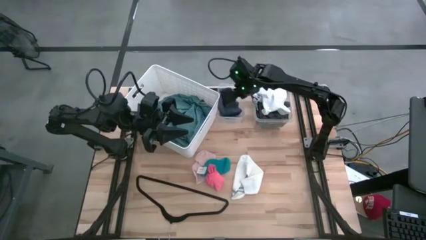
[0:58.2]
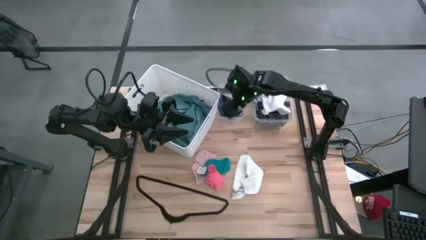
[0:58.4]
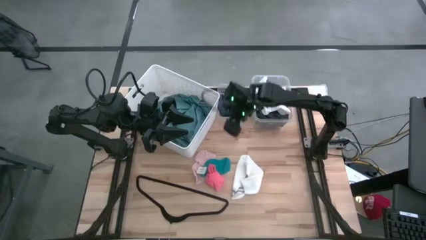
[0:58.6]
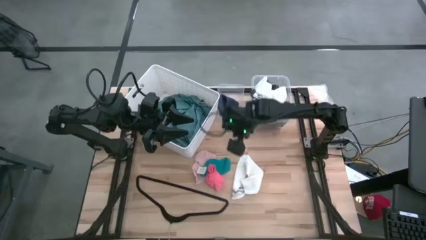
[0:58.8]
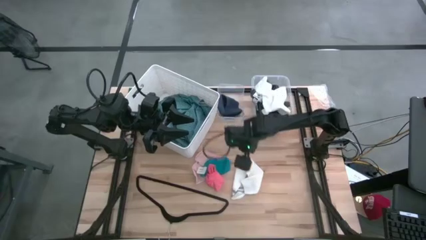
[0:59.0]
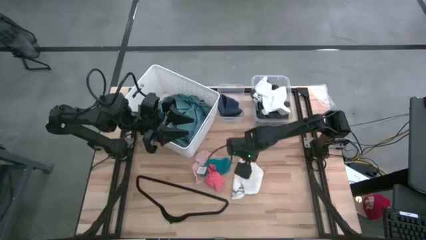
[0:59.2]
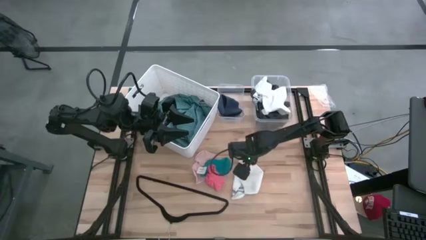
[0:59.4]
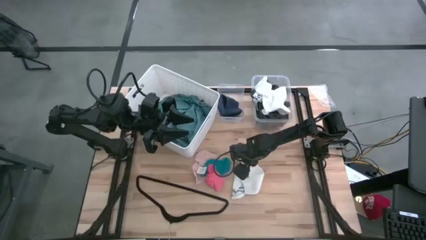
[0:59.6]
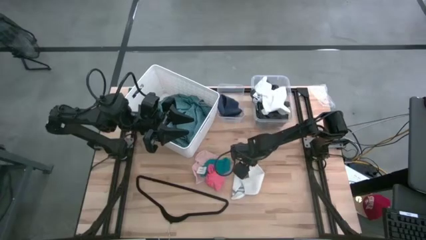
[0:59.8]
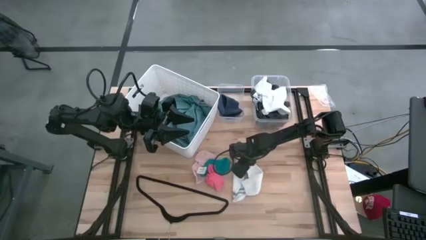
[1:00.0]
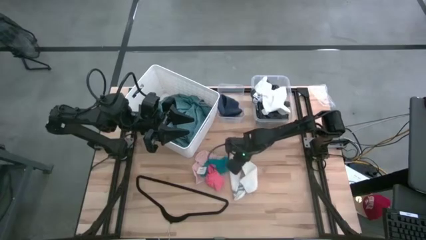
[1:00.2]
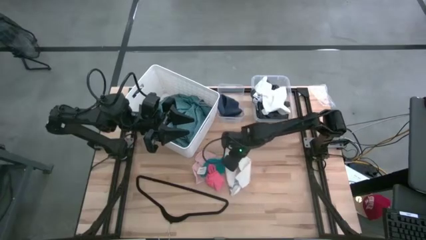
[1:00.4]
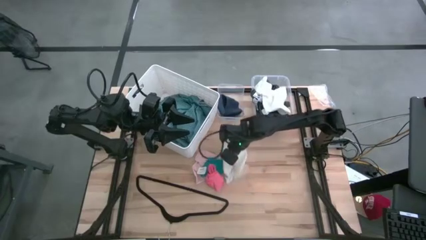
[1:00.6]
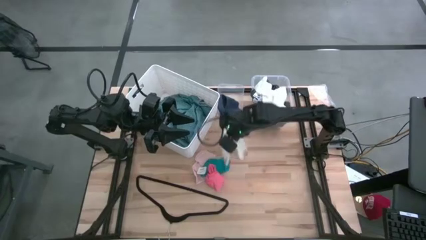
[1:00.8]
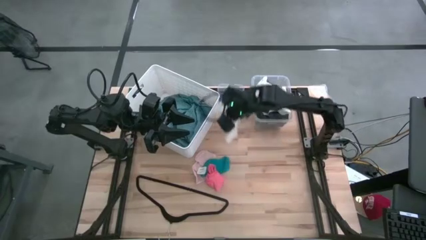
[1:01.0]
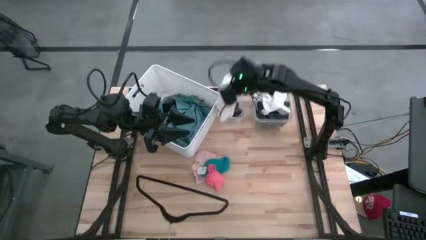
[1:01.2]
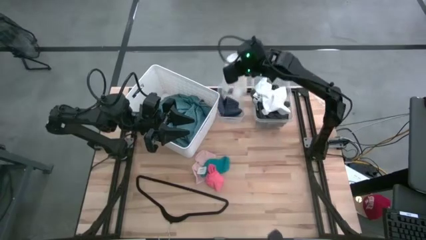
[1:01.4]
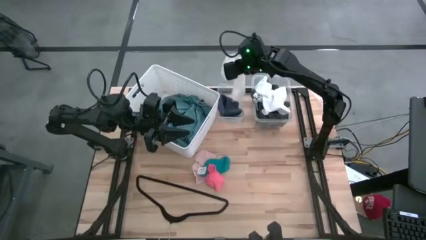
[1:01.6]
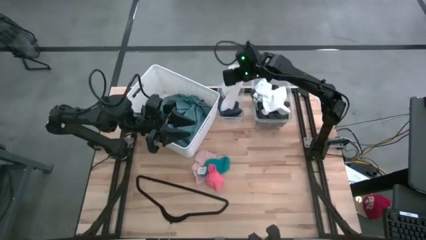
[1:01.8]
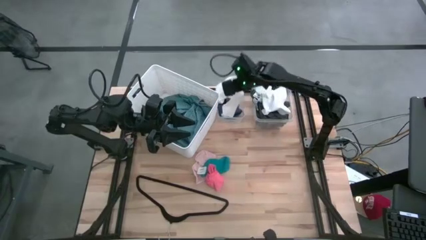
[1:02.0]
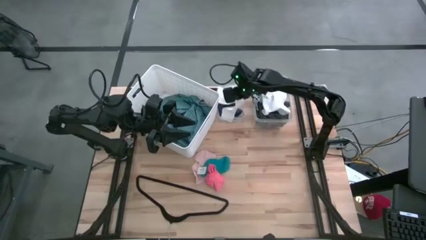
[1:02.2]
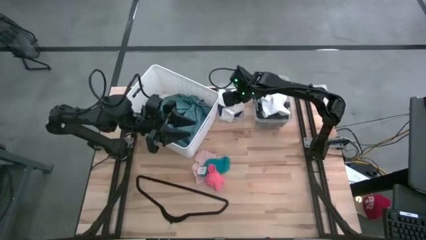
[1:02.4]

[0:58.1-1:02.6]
Task: Pick & Place Cloths
Put the white sock into the left transparent bin

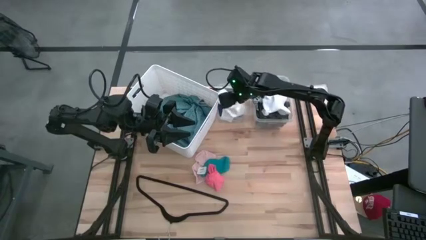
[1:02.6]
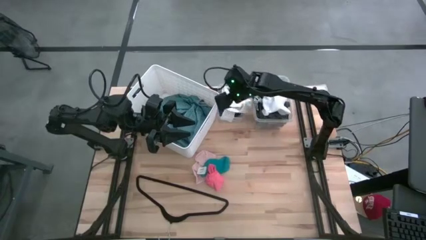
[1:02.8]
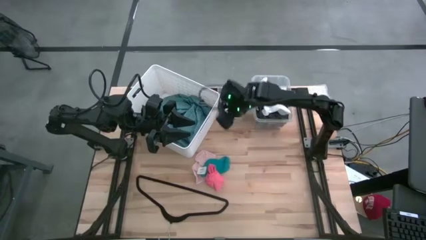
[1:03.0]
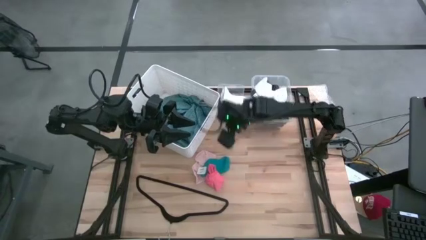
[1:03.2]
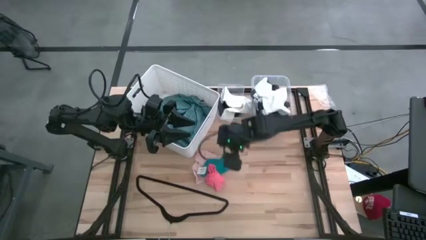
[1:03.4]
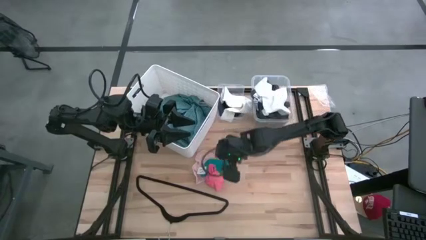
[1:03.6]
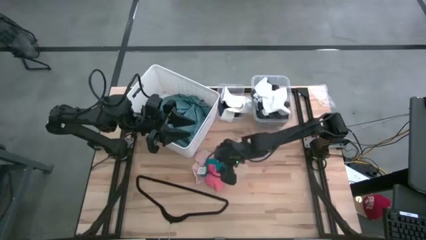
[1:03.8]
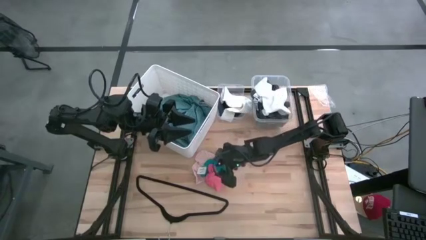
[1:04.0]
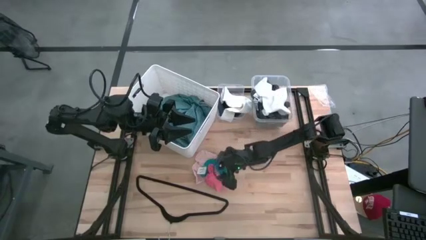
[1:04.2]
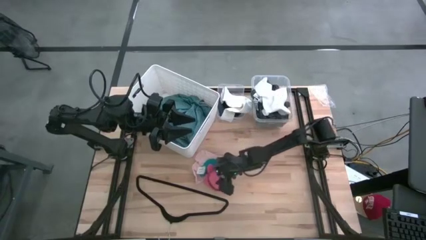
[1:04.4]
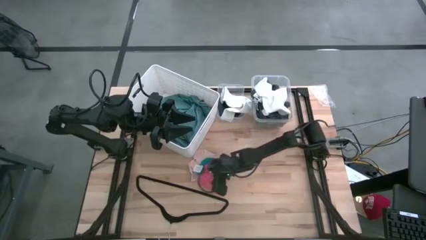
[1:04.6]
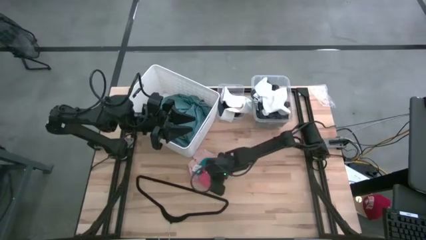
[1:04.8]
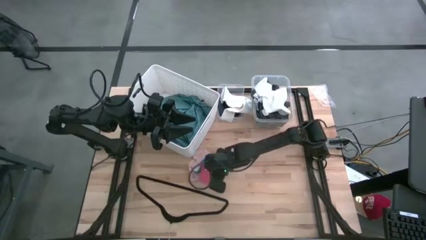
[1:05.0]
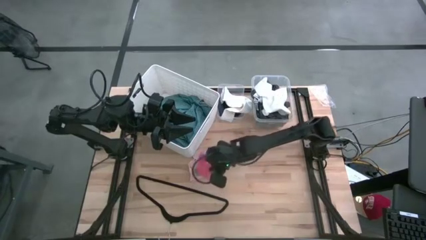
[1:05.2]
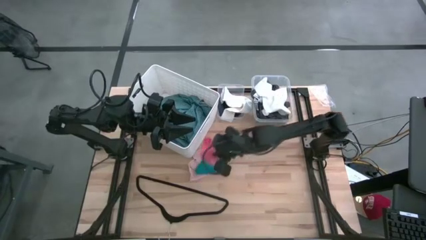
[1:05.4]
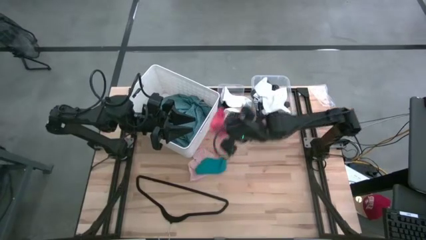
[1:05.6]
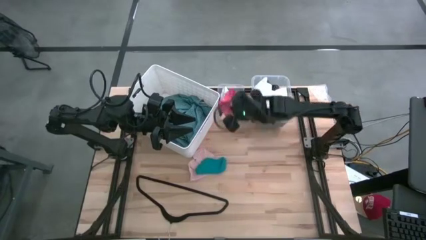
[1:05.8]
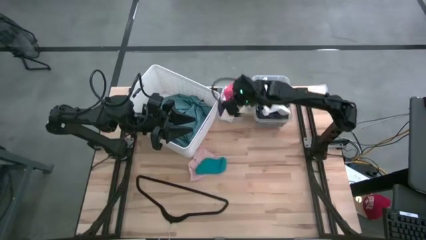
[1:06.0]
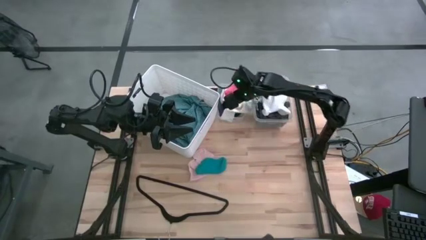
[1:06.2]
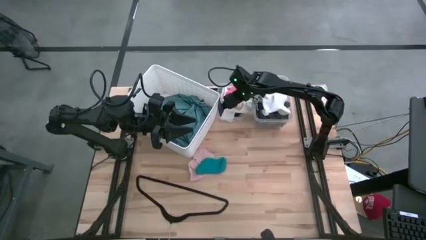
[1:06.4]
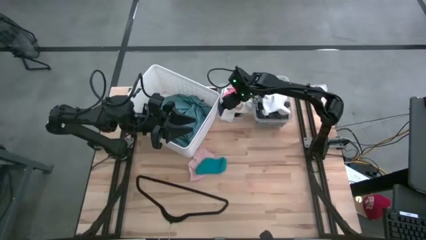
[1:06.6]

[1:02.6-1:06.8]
Put the pink sock into the left transparent bin

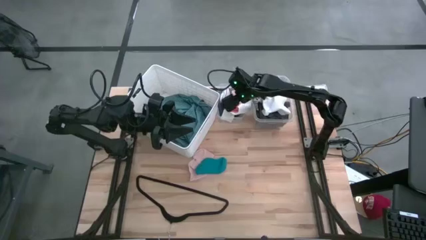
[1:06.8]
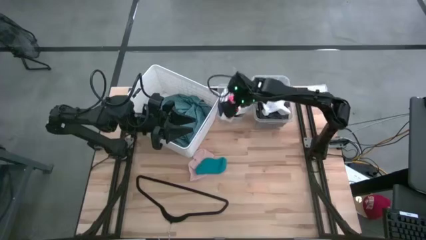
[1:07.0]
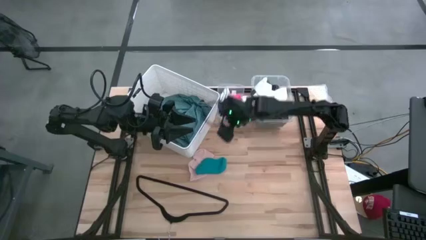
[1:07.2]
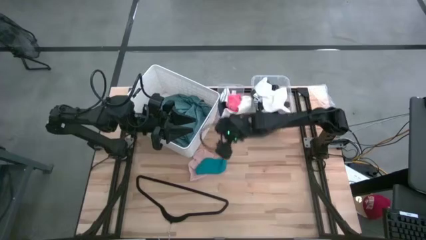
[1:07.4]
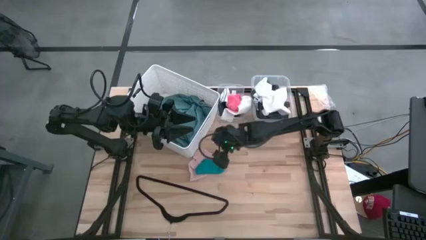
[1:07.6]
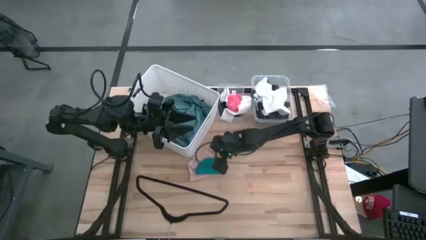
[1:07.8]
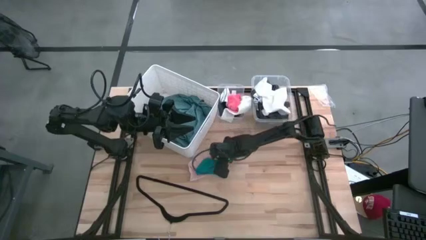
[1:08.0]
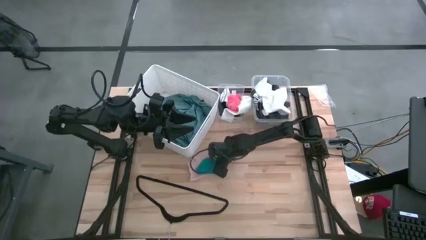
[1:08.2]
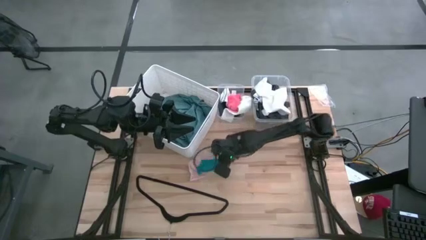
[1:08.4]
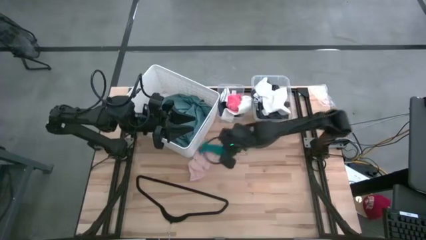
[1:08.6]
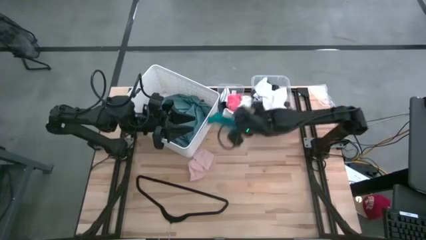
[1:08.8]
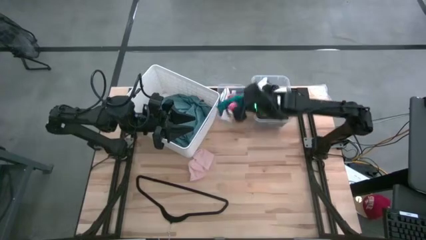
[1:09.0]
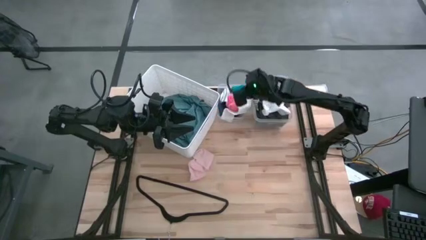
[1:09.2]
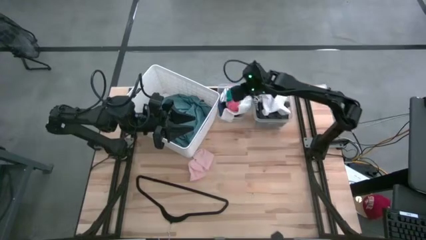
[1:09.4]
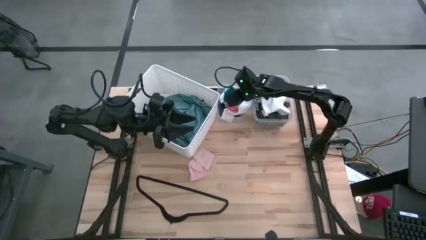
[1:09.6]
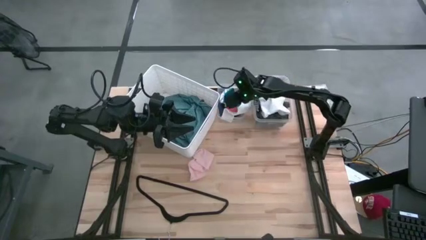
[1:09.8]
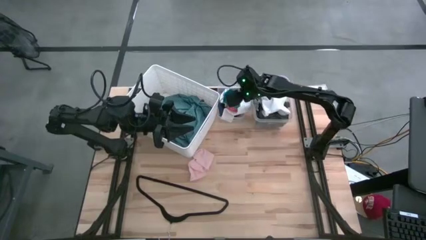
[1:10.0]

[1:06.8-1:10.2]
Put the blue sock into the left transparent bin

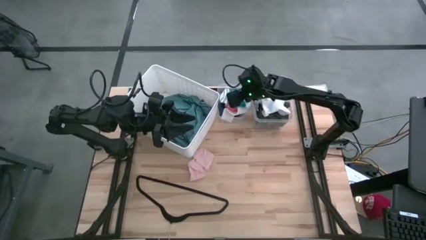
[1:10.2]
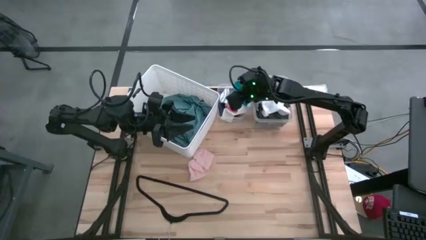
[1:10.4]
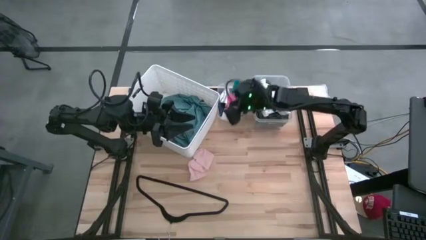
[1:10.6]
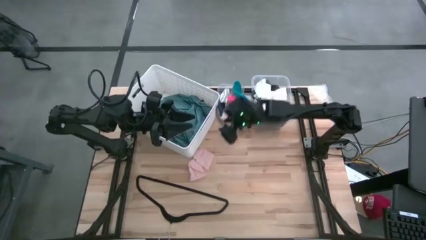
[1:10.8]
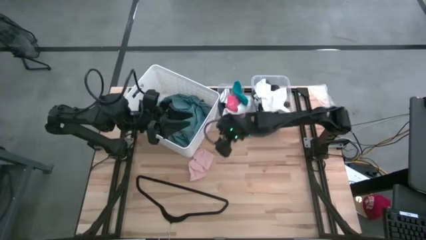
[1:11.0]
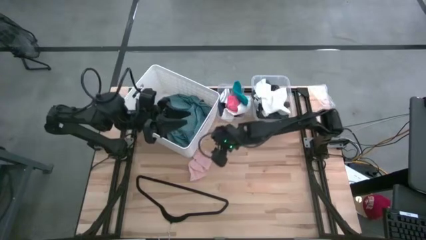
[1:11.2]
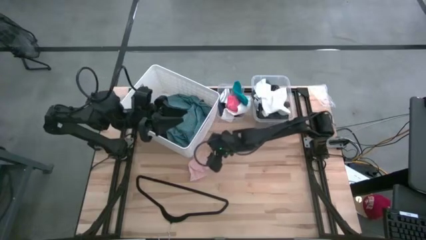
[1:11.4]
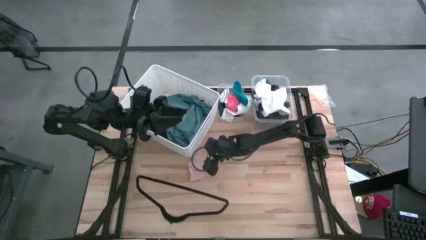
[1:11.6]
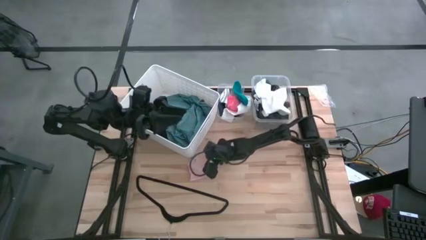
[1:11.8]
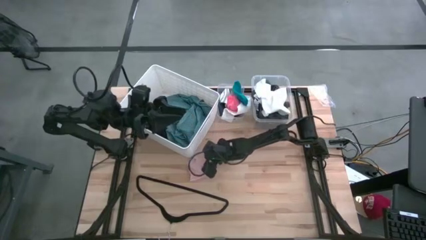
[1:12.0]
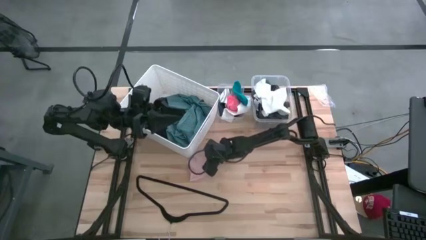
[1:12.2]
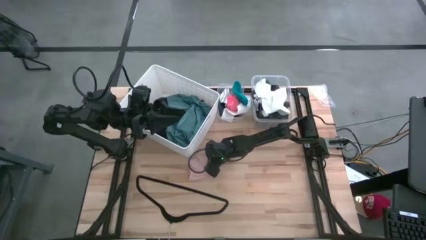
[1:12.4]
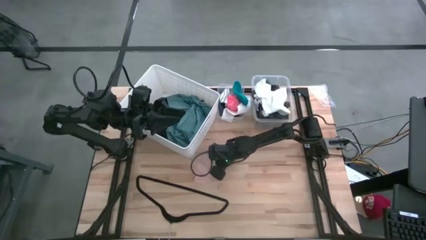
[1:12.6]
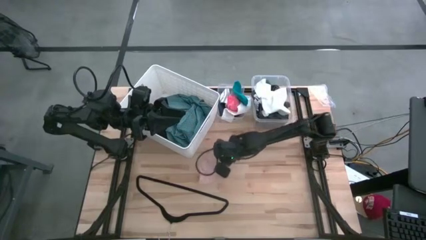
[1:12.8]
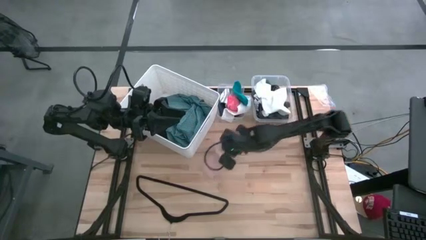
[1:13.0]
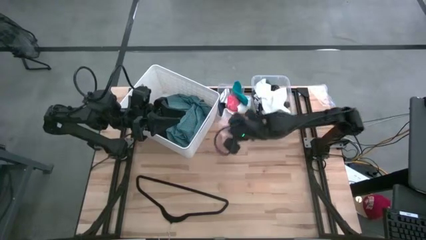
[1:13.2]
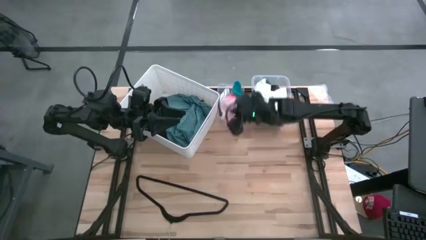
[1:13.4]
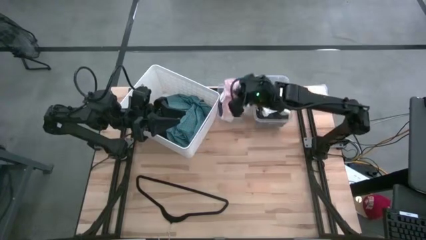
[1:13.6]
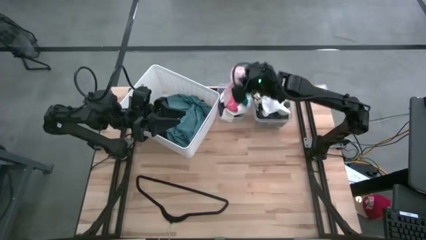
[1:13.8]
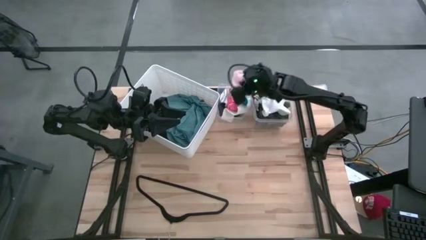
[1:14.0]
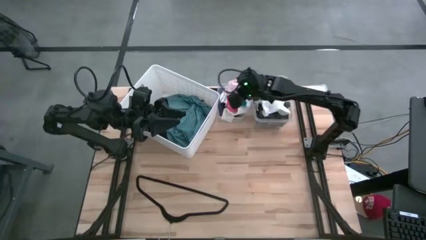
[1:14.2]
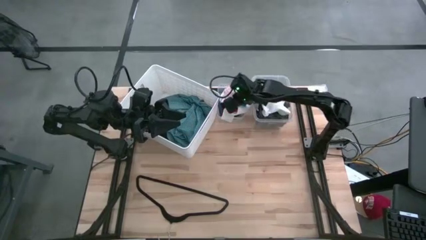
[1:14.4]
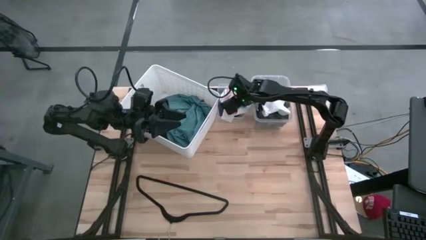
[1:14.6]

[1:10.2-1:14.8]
Put the light pink sock into the left transparent bin
